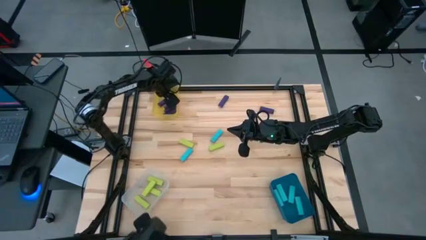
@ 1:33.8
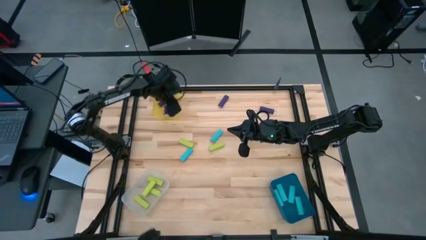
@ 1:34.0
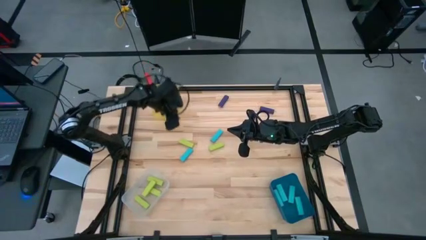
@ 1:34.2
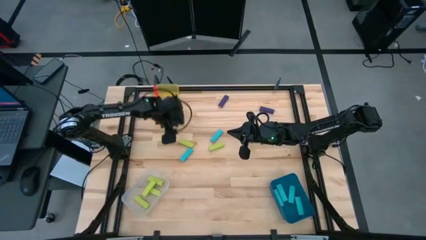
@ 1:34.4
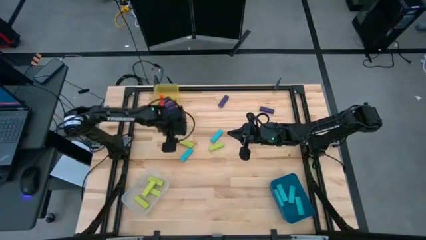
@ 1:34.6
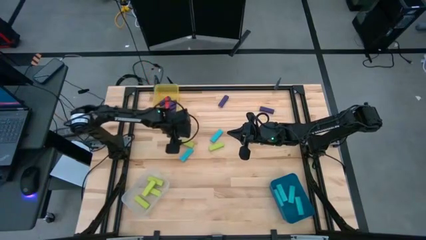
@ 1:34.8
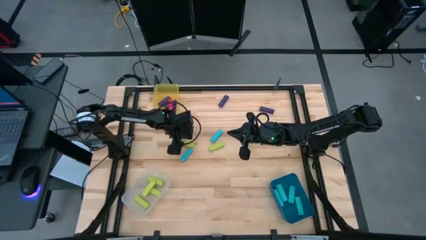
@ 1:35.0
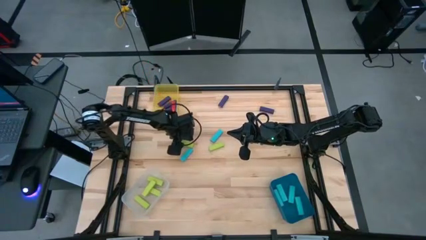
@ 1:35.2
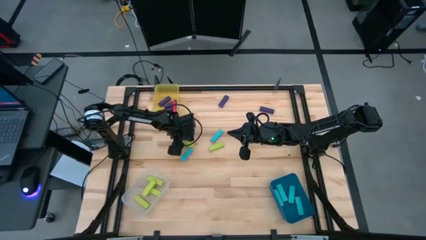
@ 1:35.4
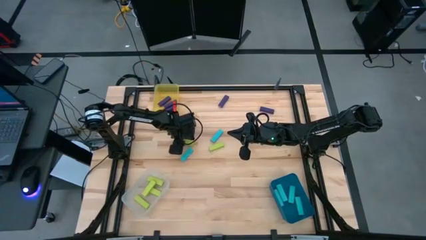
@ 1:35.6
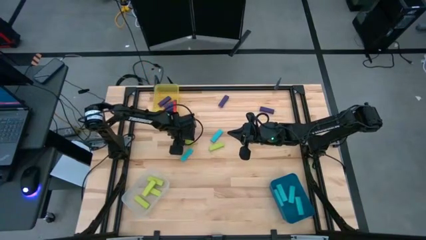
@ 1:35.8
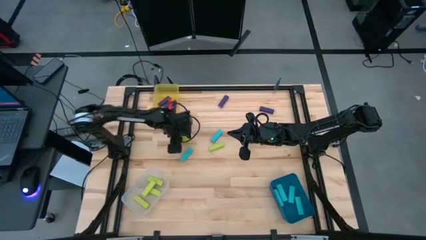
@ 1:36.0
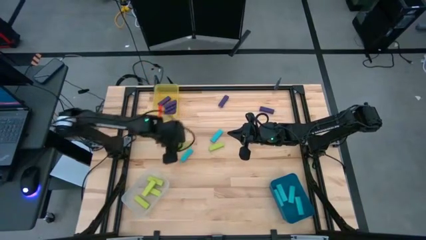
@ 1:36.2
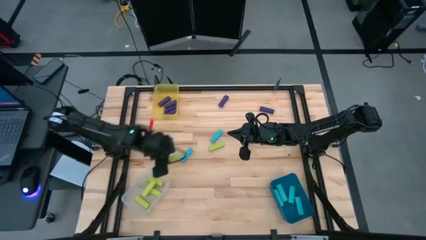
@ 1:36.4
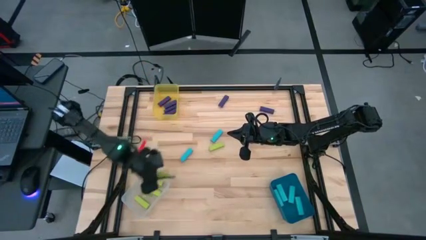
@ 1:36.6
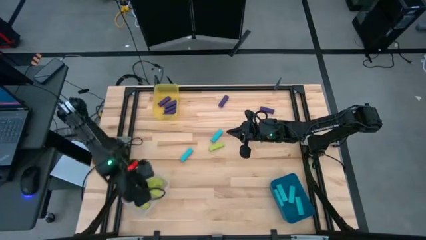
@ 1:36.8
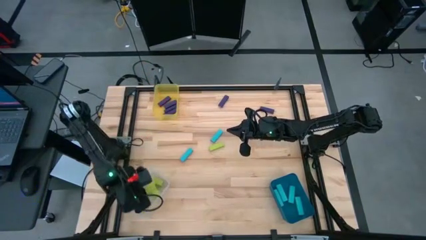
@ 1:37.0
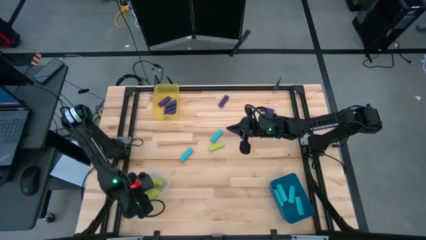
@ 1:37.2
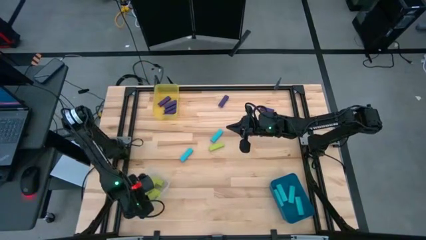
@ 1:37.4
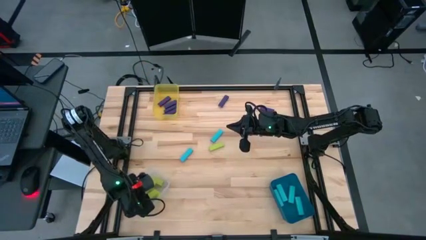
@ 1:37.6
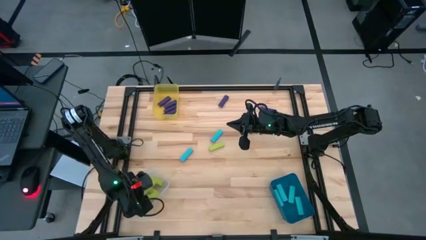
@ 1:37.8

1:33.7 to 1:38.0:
Task: Sort blocks
Put the green block into the transparent bin

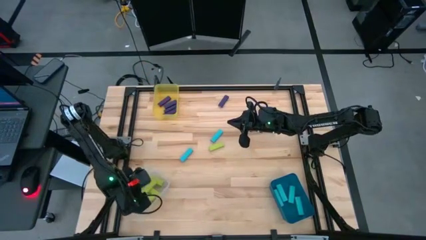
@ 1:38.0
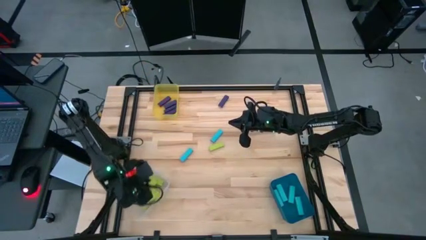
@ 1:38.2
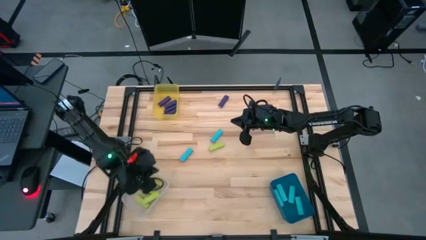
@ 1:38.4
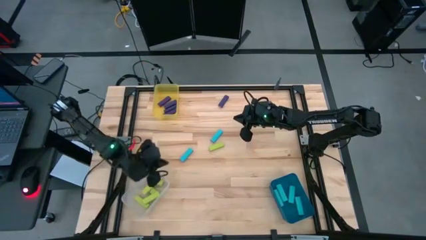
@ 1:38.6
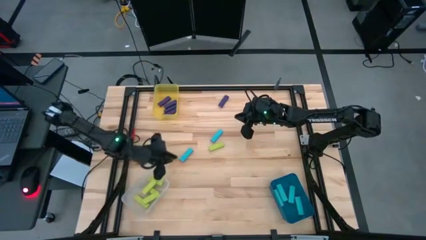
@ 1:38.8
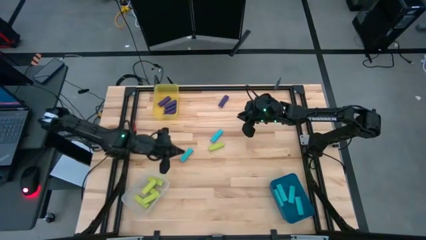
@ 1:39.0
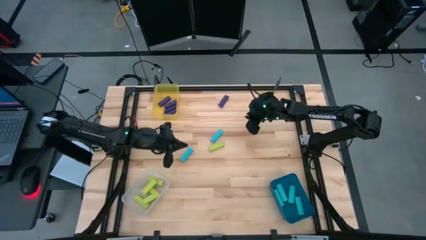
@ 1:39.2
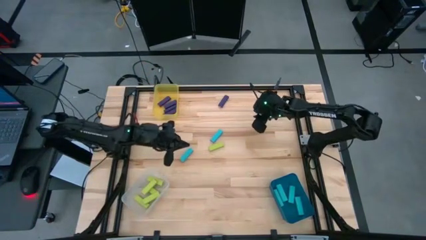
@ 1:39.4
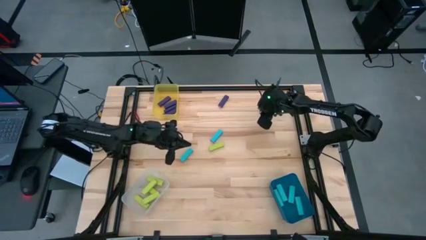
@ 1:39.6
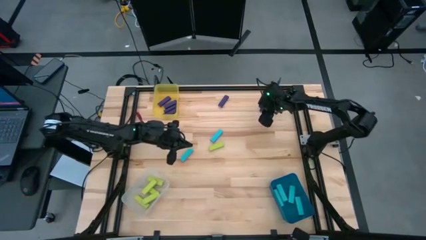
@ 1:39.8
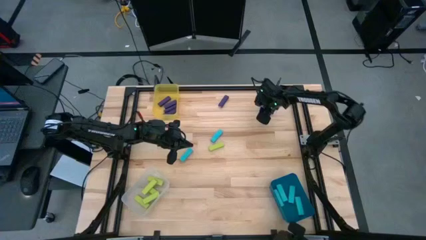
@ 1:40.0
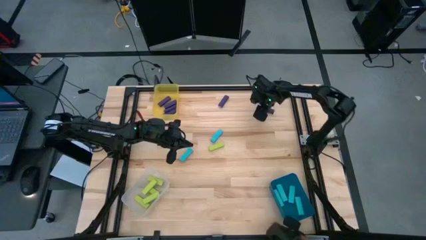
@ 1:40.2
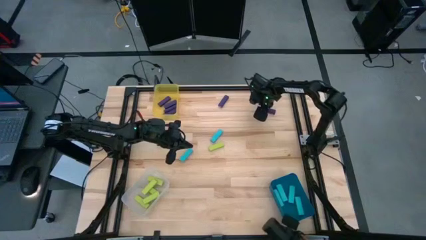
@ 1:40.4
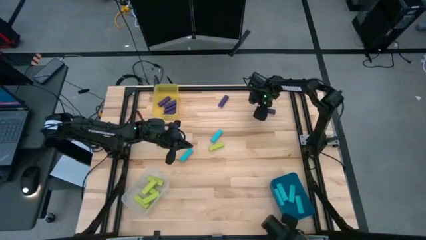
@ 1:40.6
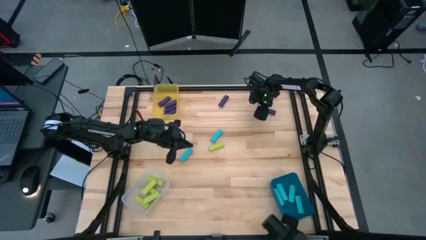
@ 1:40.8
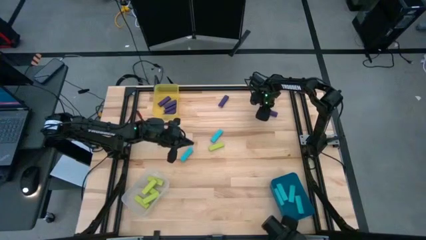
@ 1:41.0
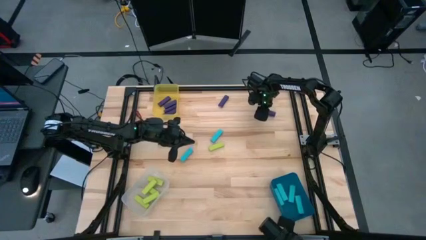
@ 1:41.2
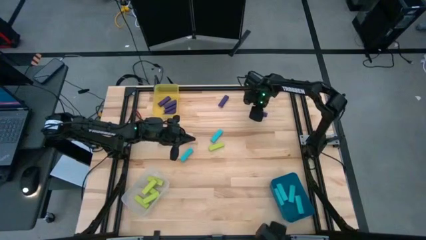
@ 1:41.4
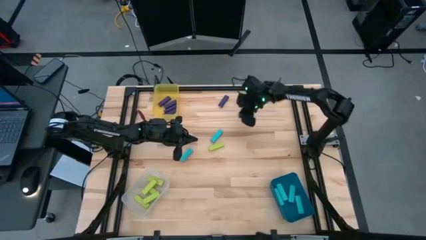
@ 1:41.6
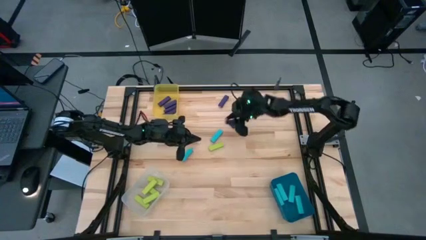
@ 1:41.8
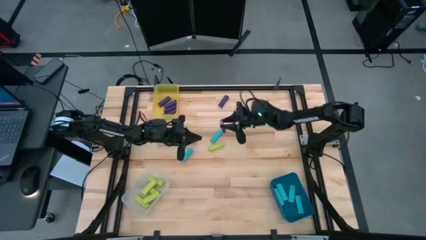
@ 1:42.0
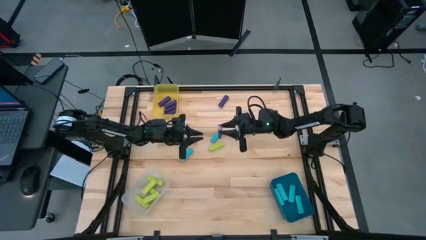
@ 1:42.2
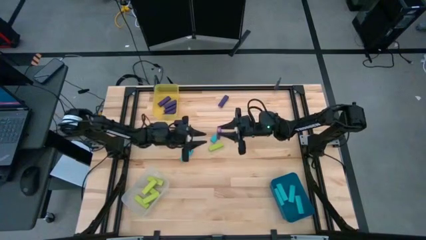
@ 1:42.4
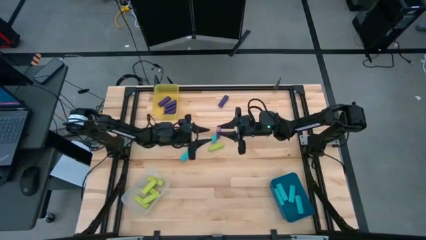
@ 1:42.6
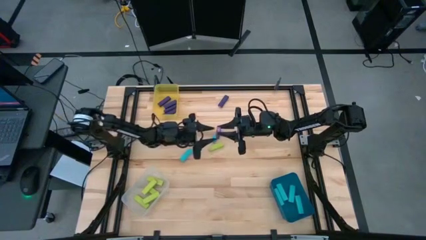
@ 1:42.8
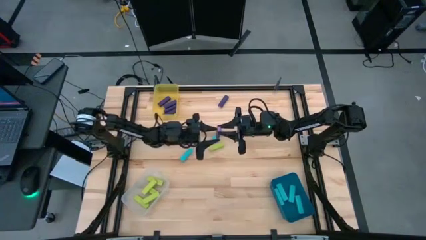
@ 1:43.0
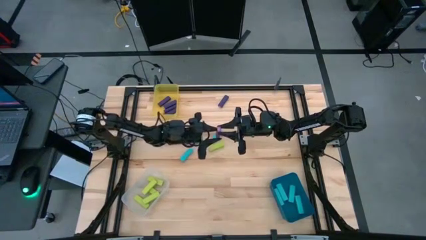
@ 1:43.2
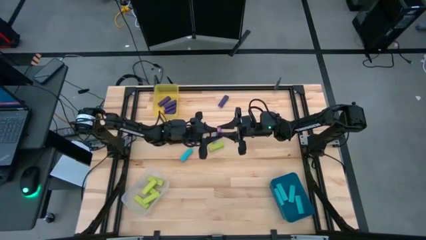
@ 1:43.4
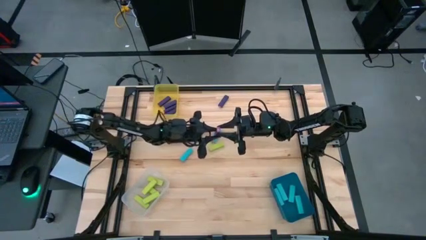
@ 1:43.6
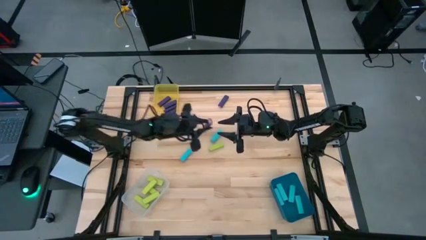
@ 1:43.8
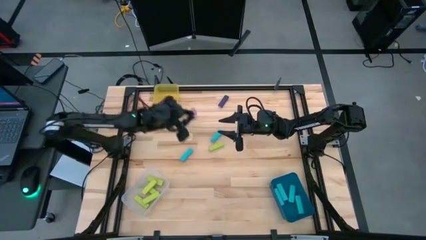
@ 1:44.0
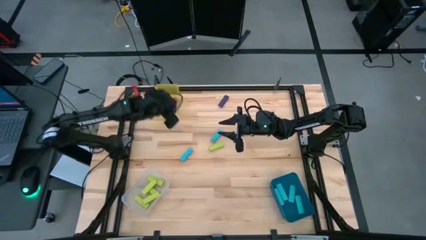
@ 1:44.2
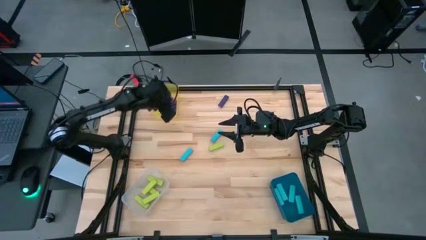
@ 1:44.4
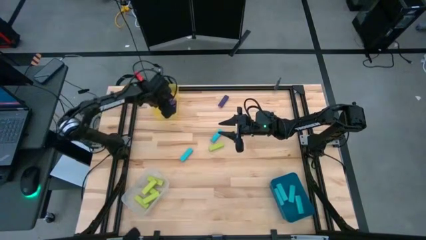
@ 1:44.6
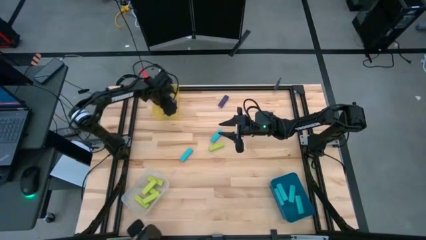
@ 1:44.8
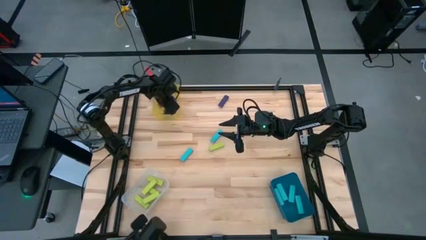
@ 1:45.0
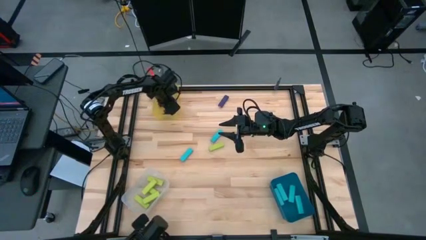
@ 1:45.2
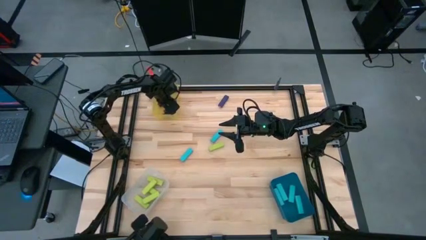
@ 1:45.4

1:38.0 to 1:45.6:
Put the violet block into the yellow bin

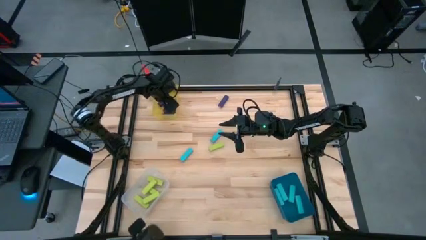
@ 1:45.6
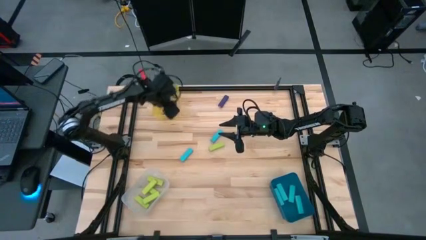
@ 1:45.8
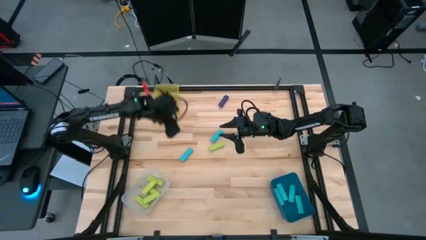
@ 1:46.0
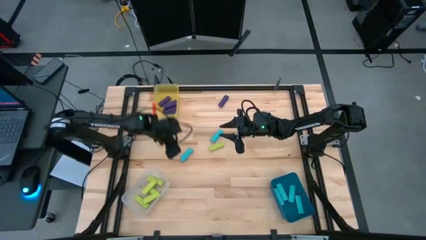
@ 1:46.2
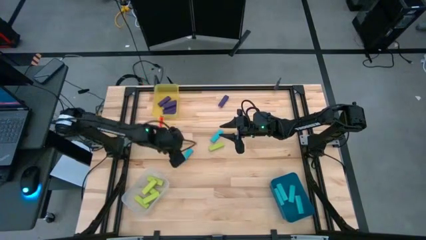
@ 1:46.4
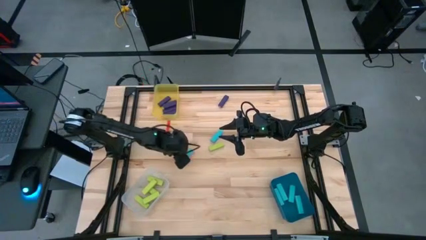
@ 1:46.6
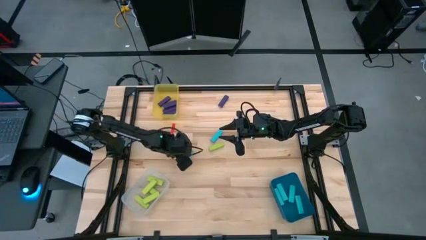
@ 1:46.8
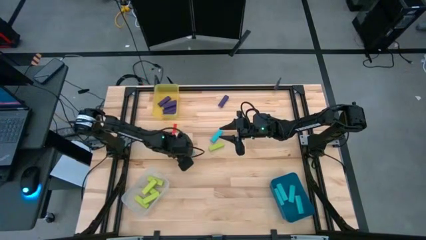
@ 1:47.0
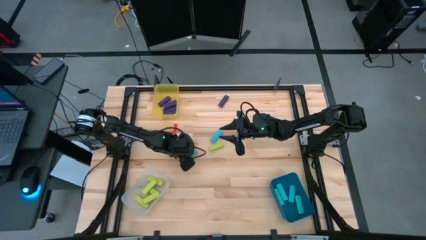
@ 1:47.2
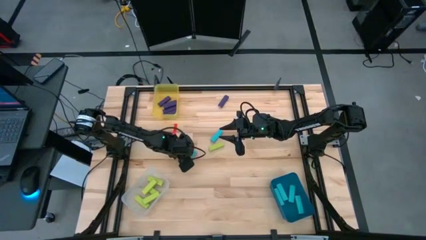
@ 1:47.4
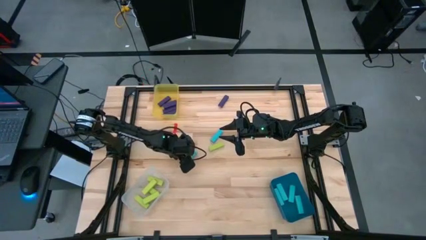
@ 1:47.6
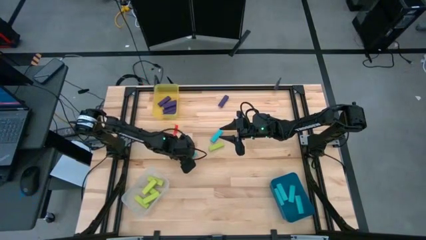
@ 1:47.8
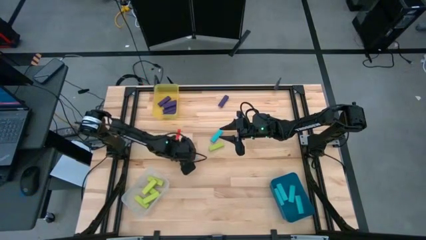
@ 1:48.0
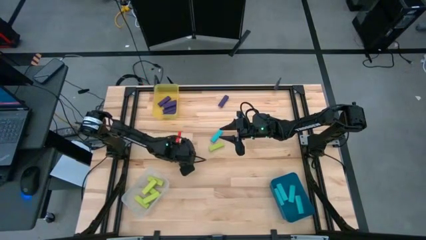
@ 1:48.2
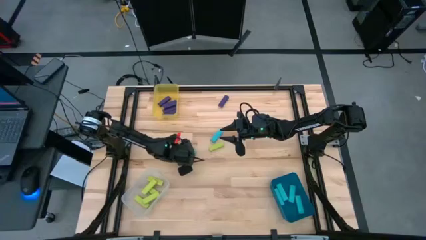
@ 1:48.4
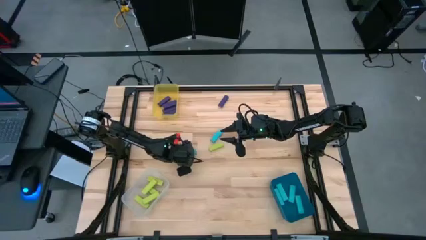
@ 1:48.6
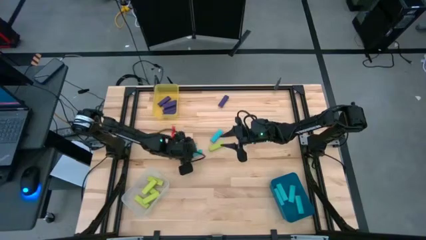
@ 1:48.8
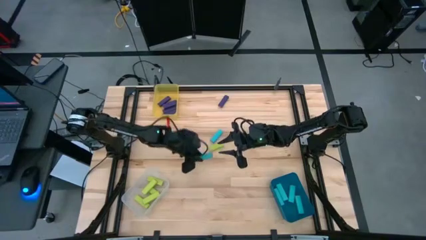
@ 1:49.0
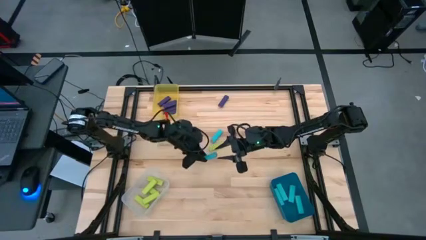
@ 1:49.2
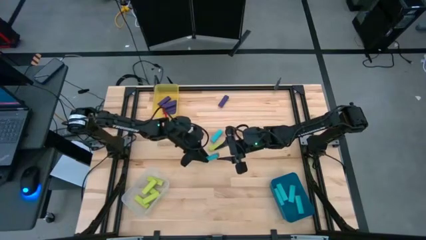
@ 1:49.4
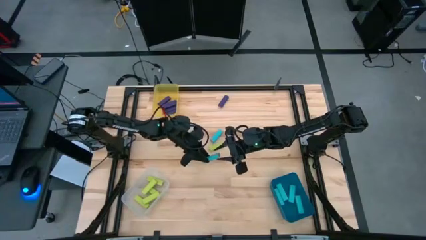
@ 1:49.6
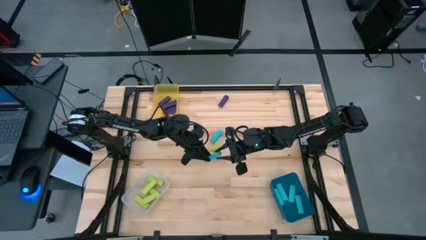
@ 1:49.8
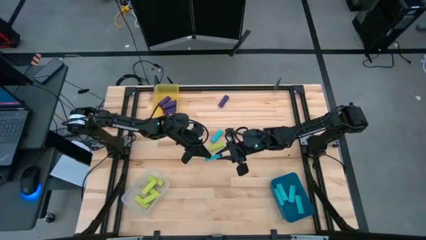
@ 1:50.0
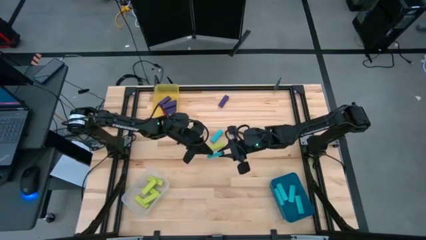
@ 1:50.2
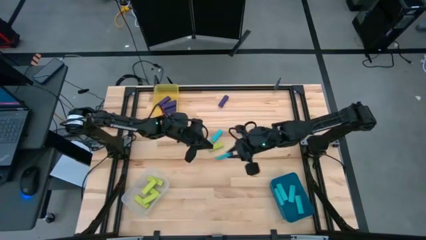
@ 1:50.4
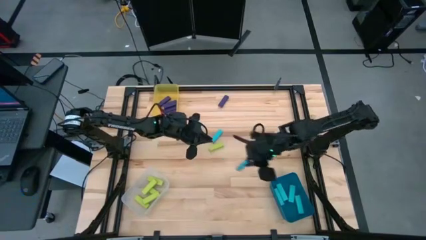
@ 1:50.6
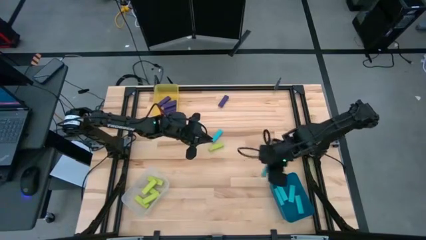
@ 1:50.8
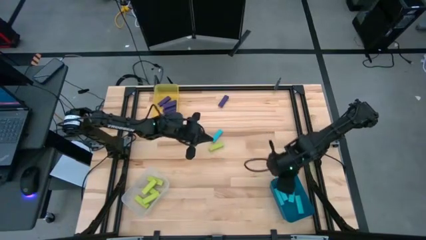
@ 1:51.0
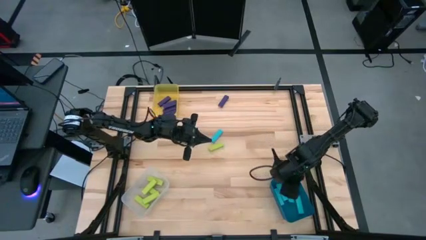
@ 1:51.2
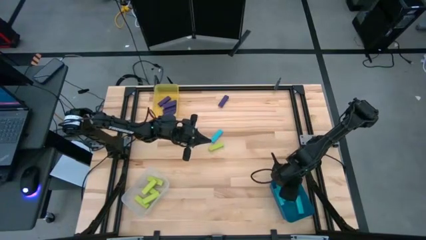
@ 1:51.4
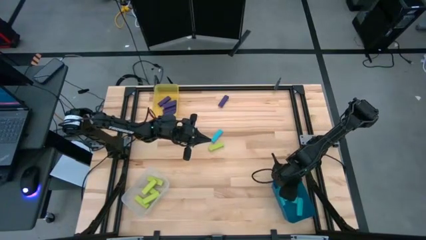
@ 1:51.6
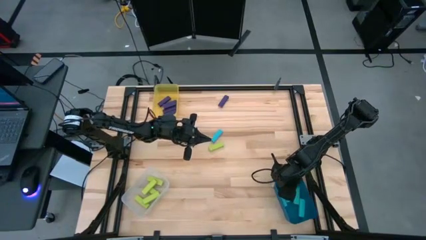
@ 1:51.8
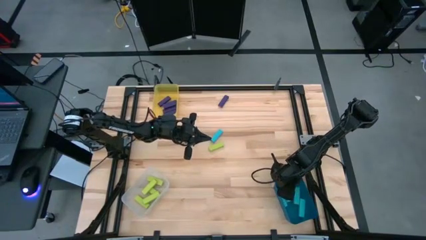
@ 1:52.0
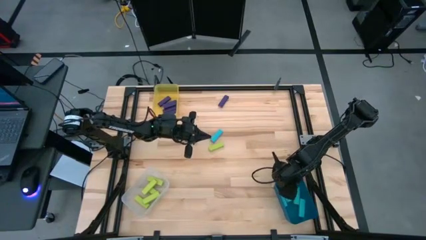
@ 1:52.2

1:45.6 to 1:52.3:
Put the blue block into the blue bin
